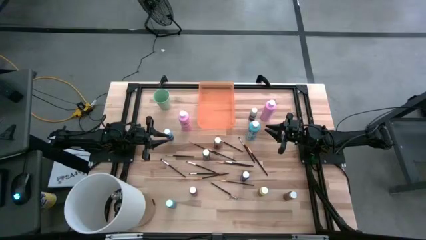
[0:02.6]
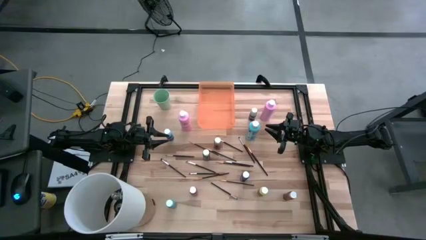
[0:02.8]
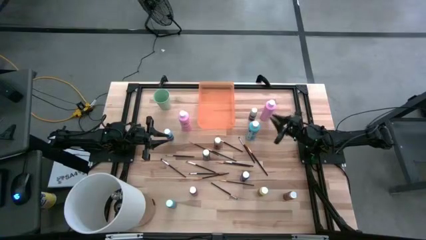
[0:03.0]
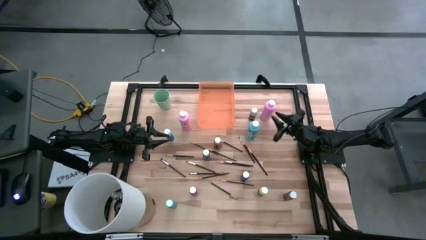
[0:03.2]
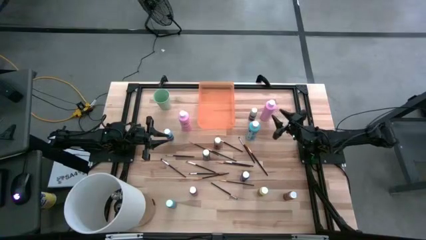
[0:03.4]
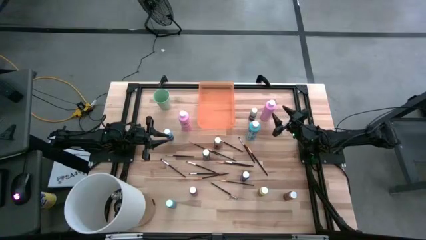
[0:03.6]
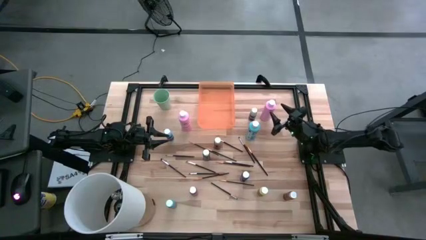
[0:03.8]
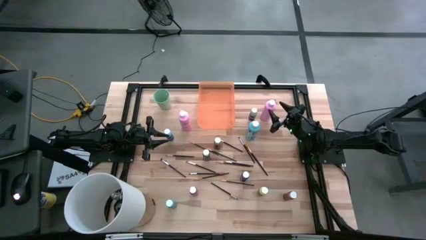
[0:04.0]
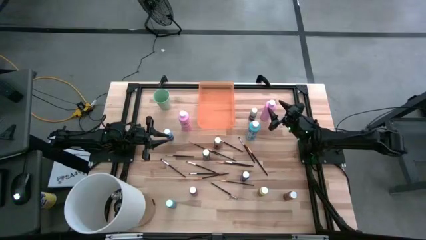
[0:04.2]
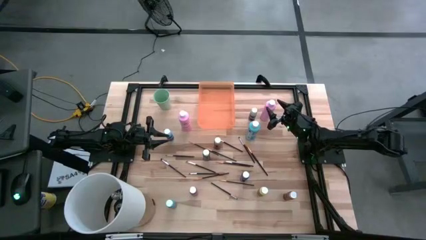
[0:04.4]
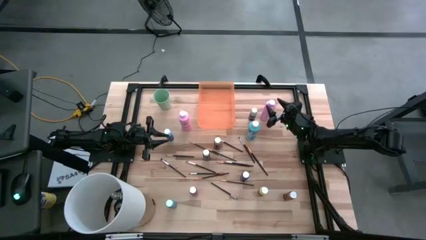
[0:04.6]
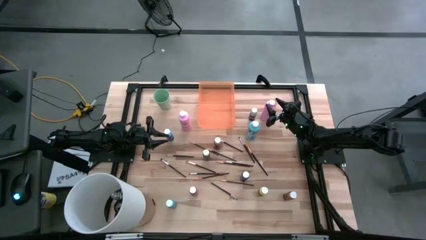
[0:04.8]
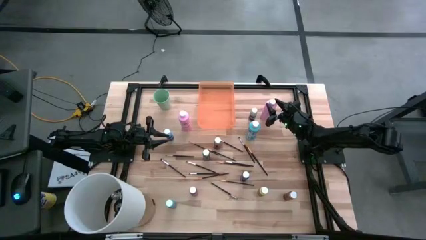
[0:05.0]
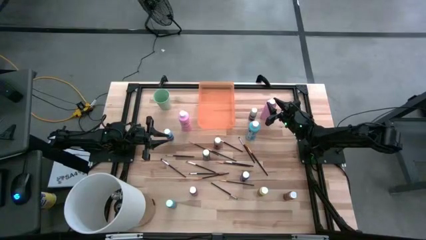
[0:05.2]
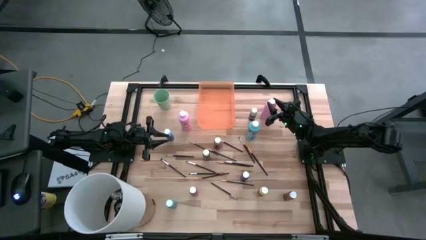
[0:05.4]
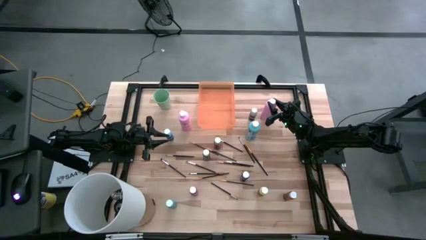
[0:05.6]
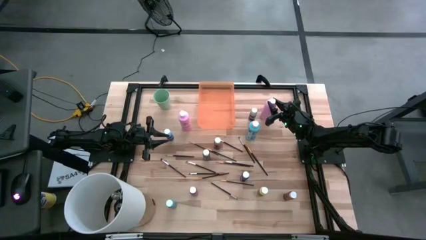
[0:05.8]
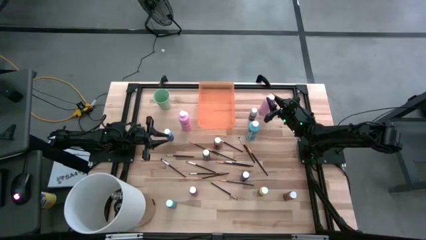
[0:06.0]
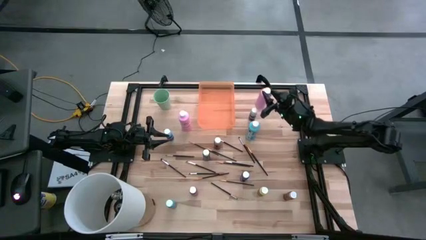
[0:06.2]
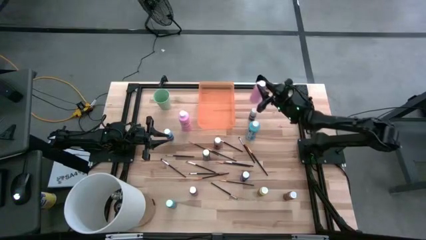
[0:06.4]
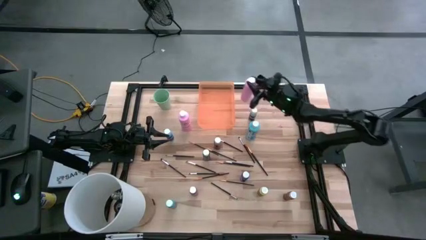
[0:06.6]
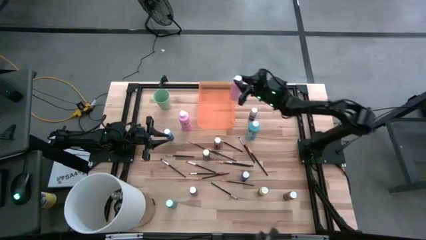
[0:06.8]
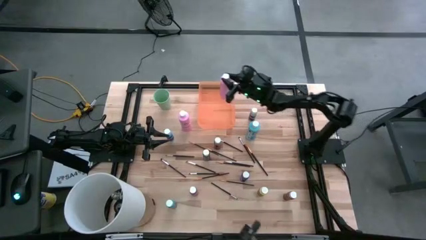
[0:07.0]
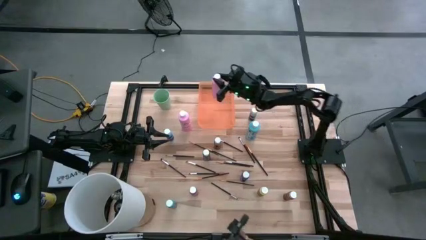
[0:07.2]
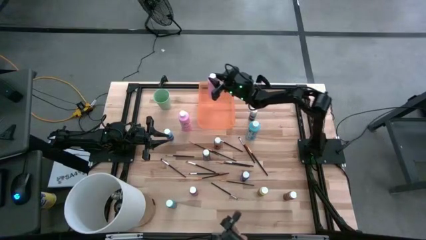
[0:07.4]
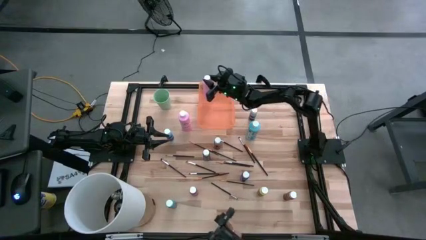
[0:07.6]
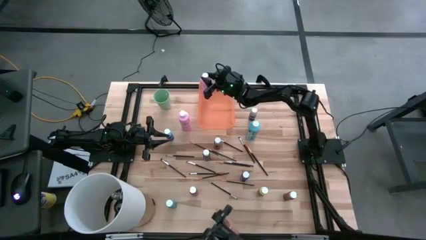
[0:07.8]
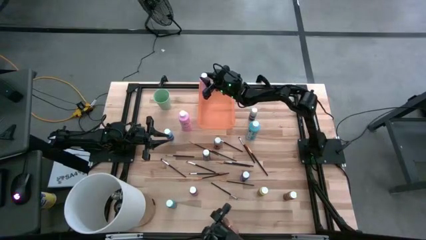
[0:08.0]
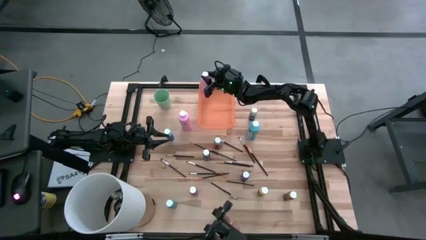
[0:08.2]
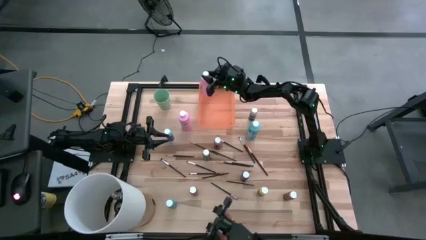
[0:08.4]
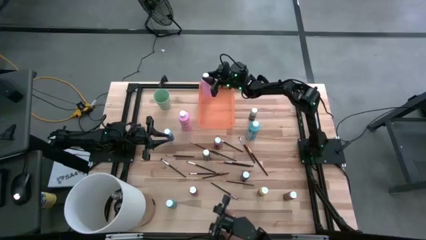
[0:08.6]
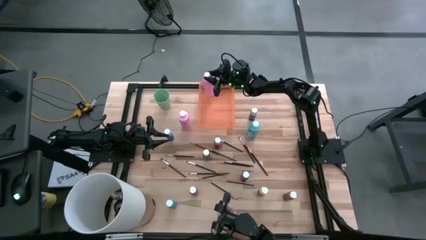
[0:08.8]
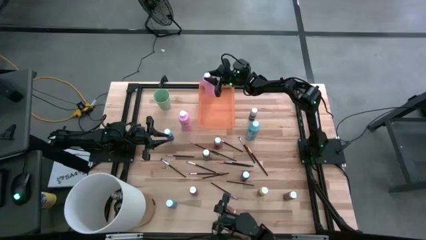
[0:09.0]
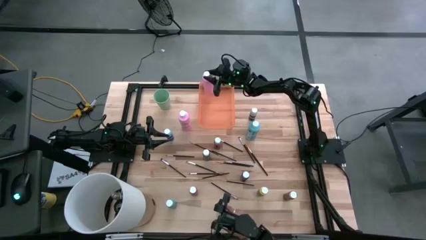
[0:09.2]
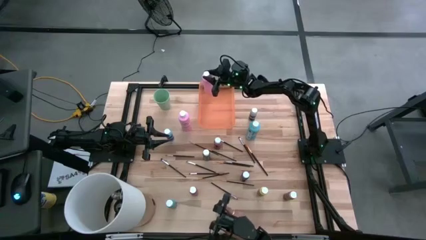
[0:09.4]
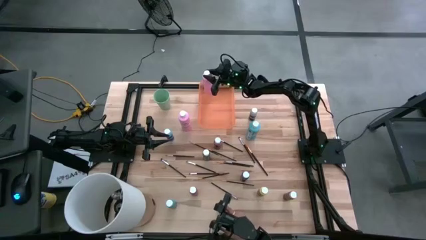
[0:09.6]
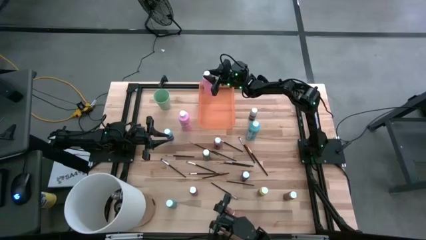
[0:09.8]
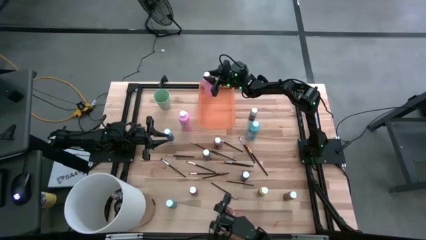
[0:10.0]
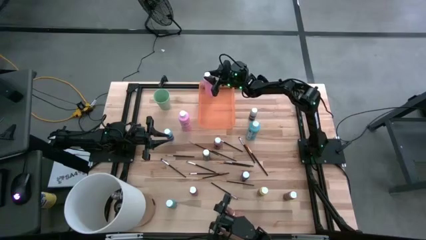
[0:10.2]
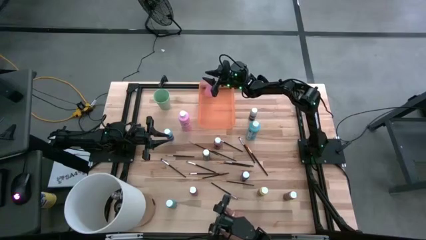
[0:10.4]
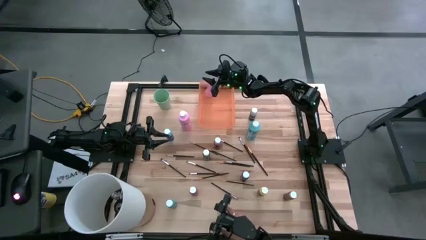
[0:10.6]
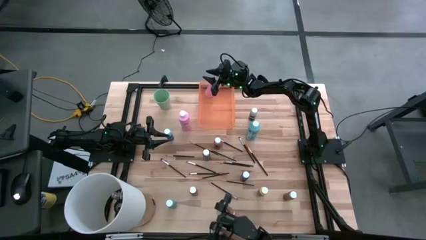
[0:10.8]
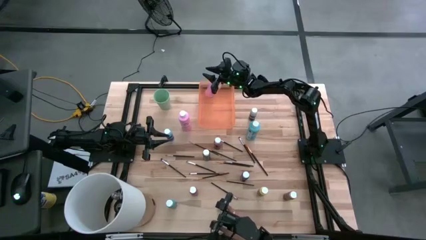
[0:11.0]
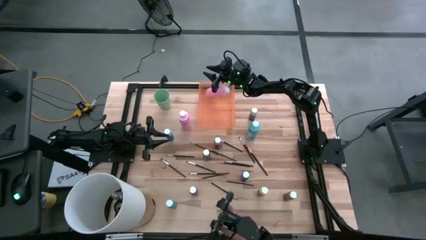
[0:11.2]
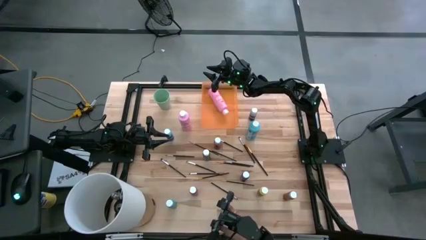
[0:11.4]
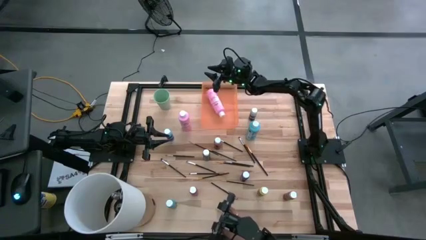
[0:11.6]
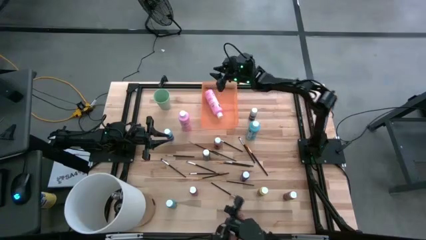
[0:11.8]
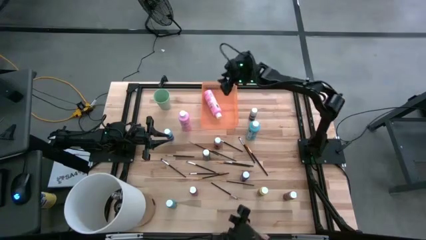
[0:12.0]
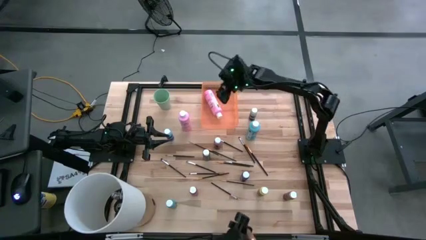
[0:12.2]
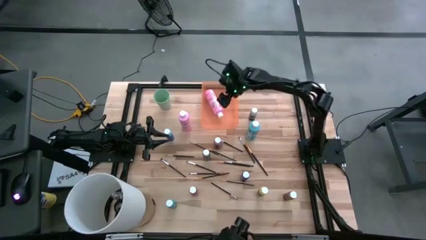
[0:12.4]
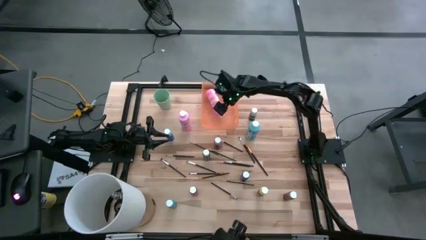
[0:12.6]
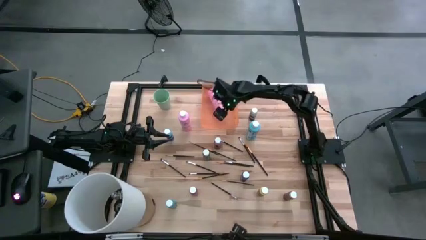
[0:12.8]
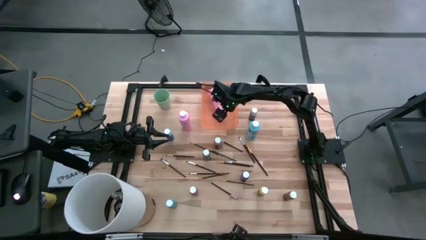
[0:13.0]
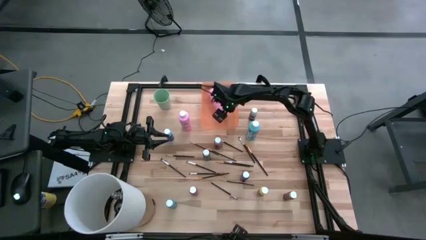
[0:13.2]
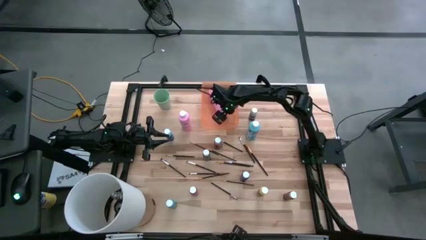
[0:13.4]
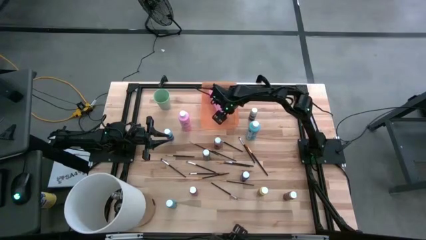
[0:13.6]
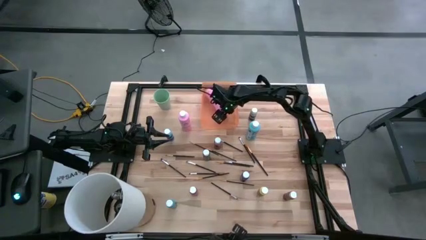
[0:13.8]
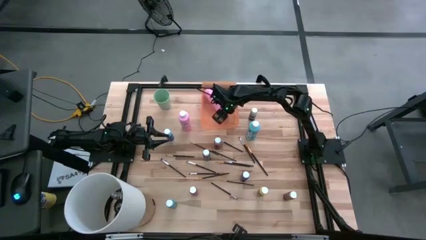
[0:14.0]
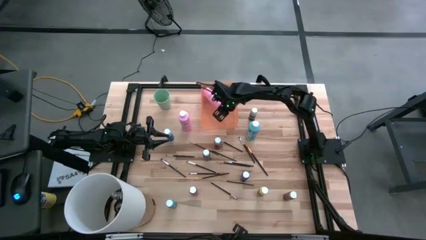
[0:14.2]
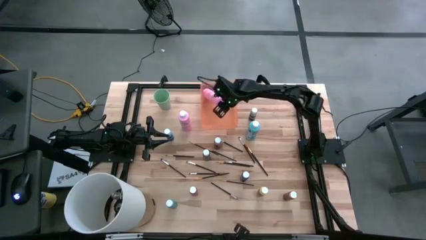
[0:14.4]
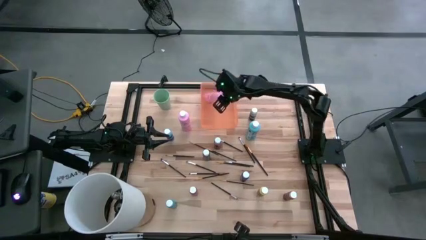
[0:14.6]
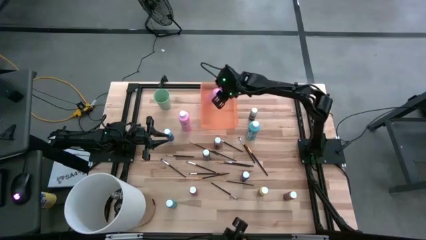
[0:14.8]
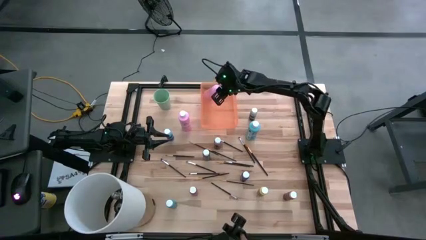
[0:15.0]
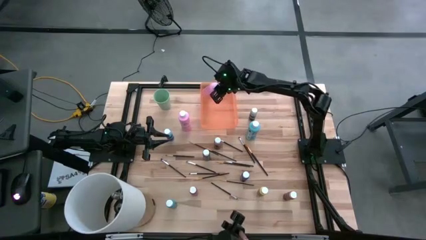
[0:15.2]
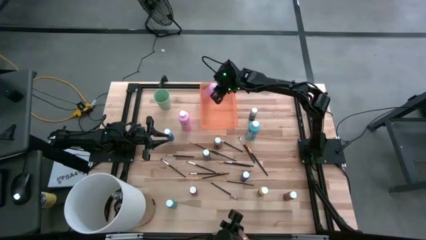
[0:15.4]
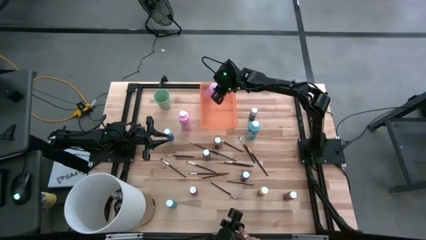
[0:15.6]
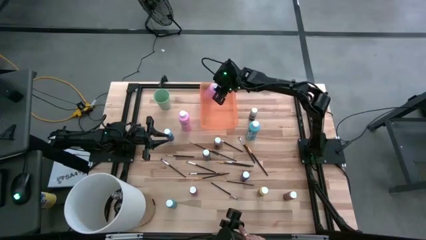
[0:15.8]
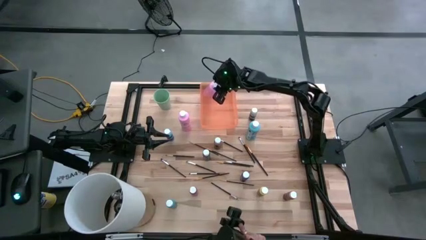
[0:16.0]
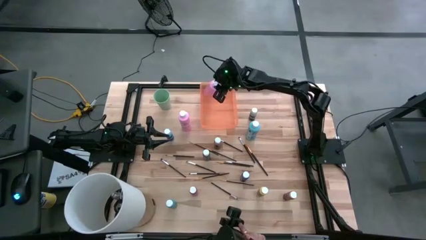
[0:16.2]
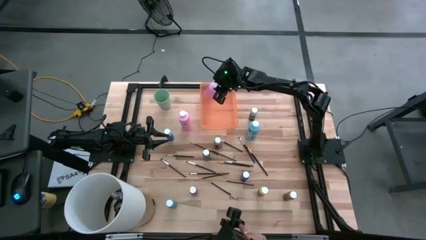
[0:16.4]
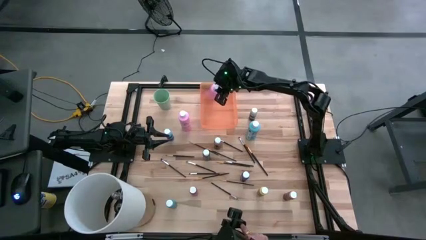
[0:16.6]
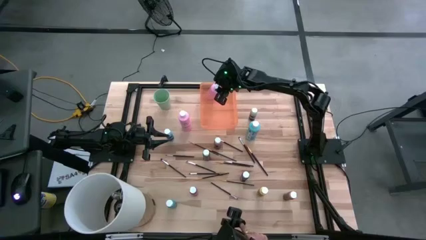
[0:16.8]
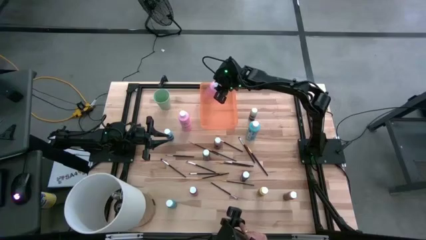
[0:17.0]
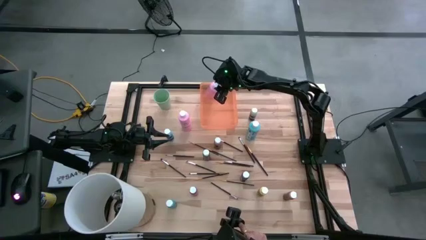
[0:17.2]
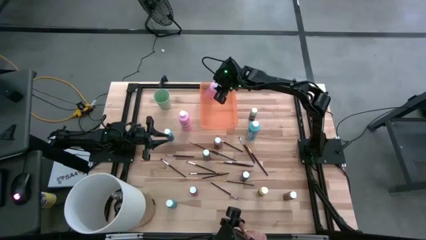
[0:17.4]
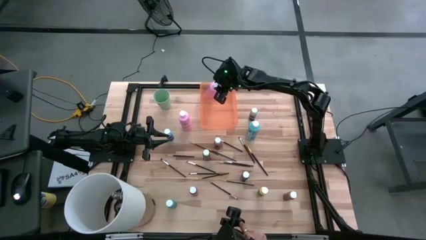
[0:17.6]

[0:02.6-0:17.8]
Task: Pick & Place Paint Supplies
Put the light pink paint bottle into the orange bin
